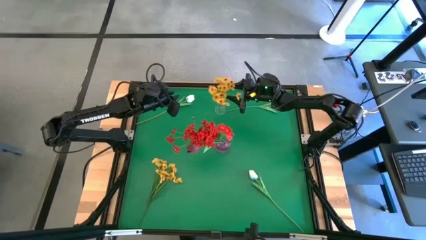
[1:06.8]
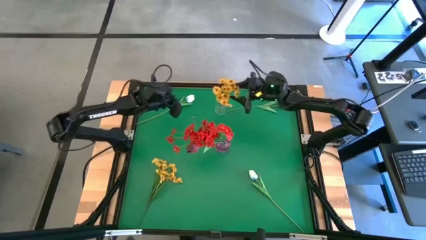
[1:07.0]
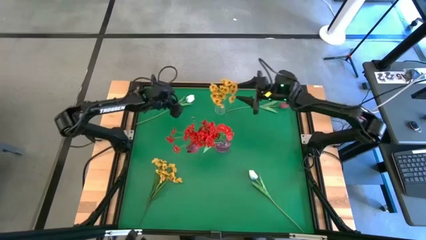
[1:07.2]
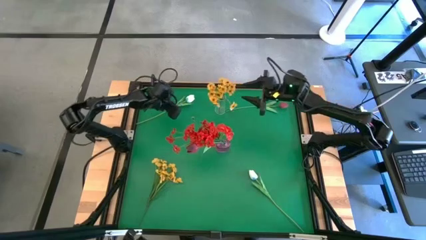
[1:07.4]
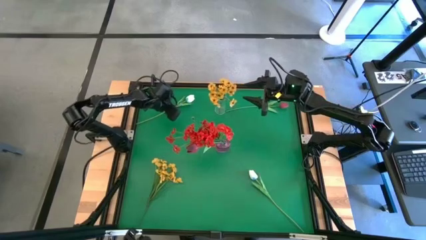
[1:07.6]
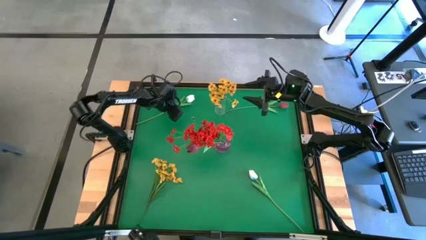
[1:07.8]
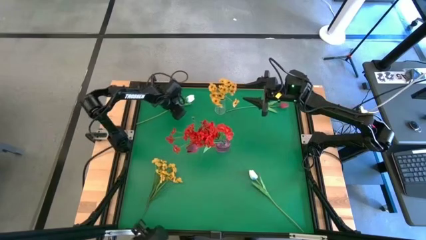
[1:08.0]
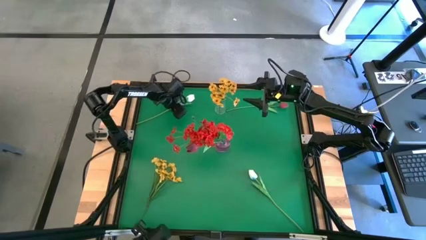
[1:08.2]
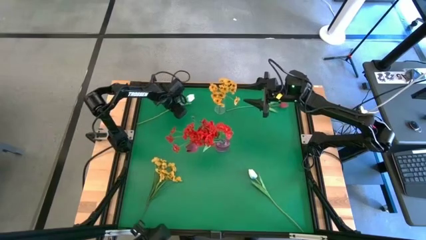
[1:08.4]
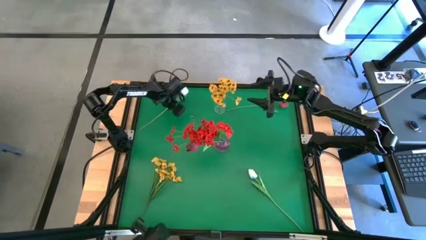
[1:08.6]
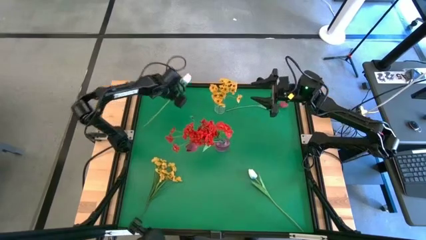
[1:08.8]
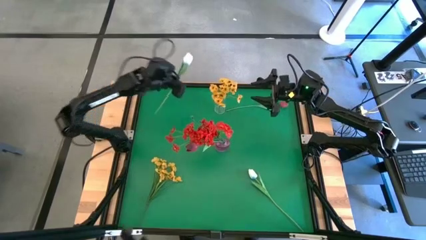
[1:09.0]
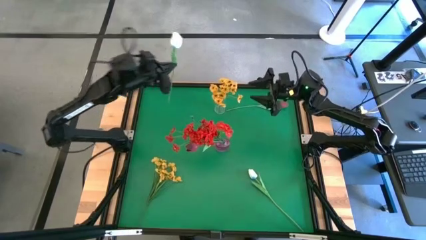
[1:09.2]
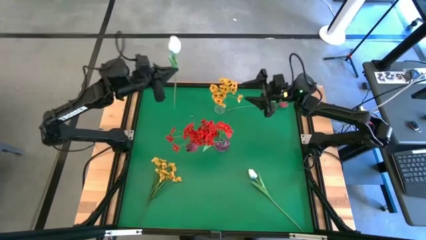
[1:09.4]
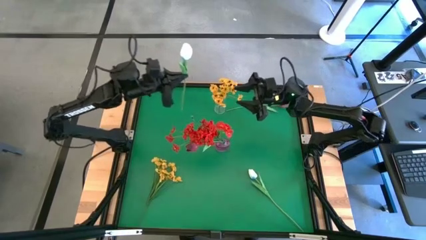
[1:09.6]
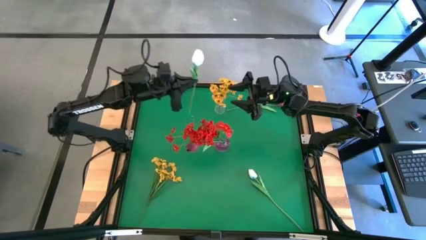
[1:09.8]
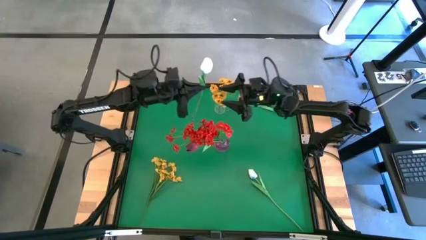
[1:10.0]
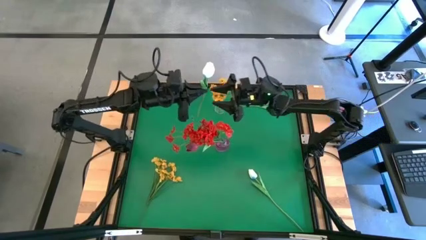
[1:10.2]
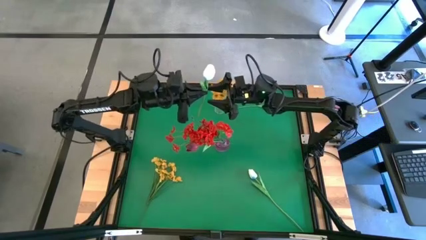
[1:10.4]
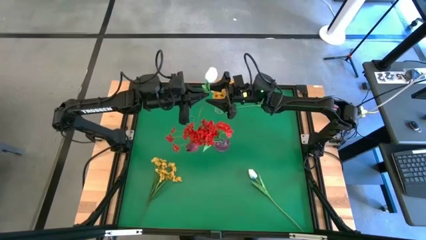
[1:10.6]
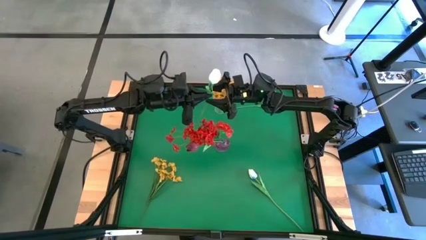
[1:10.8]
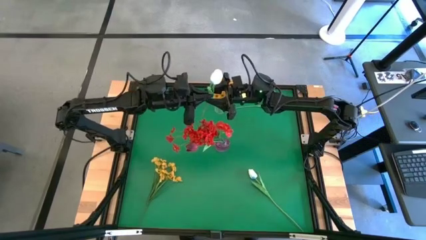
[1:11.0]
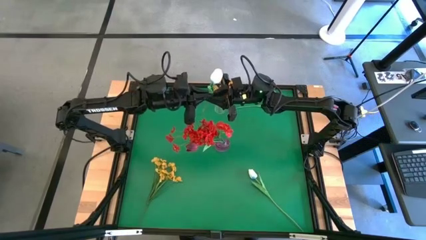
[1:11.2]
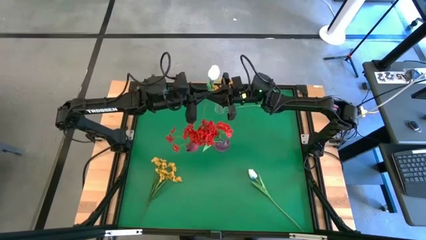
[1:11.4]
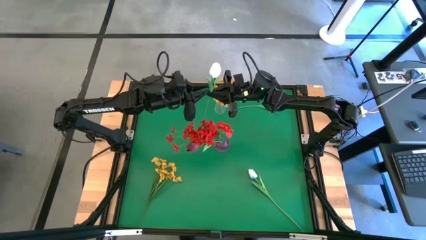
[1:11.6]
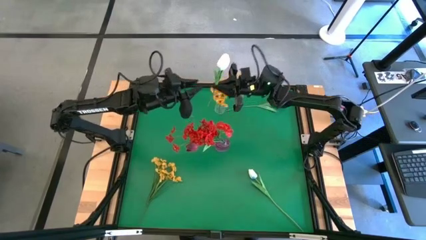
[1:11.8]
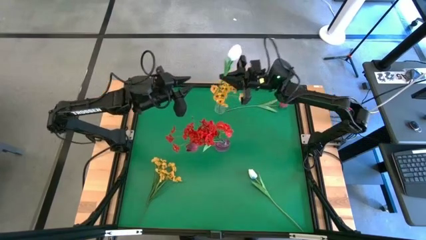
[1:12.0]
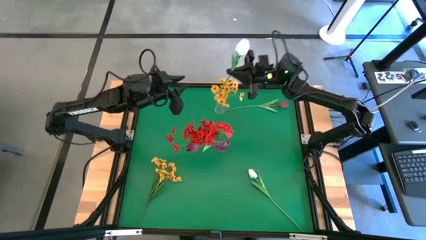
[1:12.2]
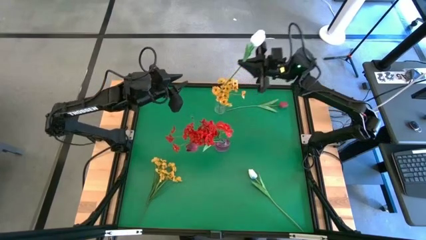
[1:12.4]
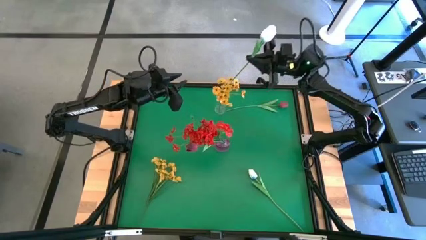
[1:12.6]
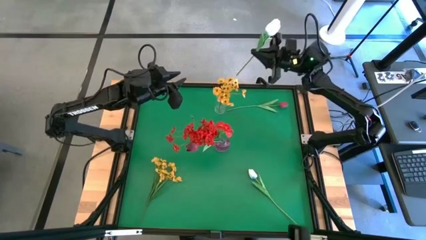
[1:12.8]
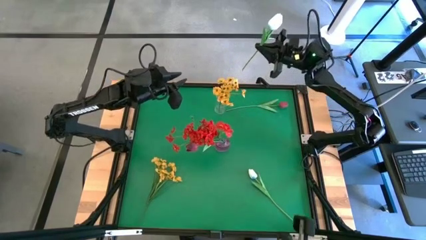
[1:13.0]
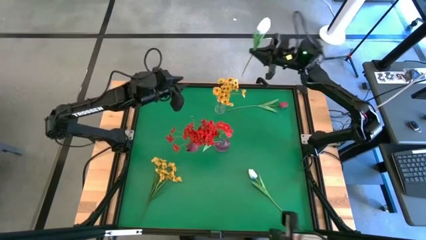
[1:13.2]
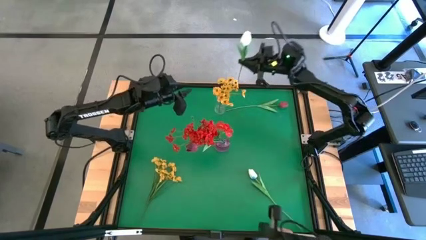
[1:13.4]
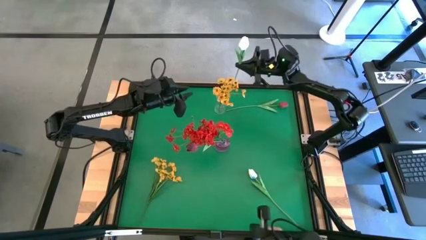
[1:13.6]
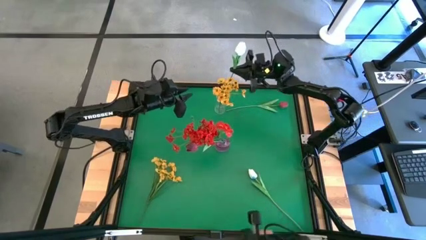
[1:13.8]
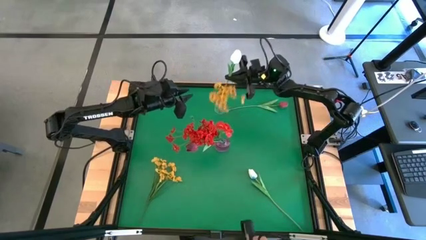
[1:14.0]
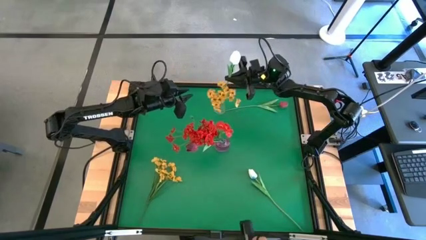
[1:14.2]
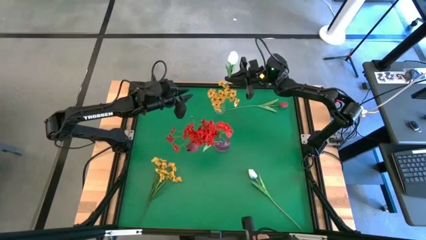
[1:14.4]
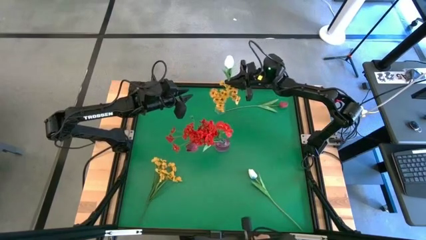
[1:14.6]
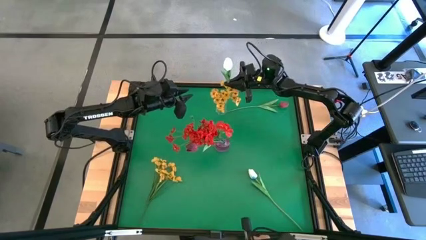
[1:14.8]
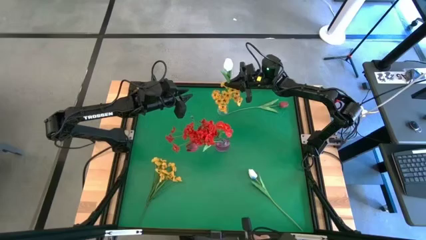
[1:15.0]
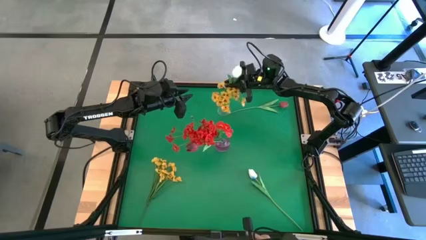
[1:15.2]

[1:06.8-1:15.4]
Task: Sort flowers into vase by color
Put the top white flower into the transparent vase

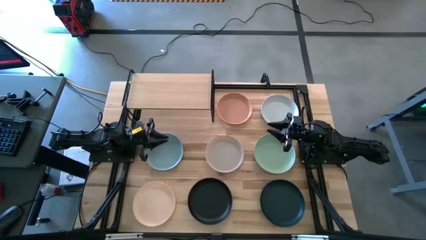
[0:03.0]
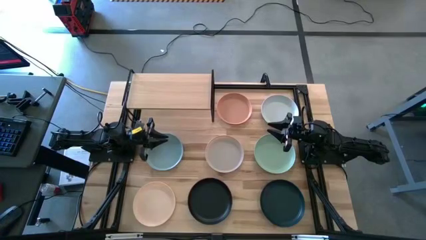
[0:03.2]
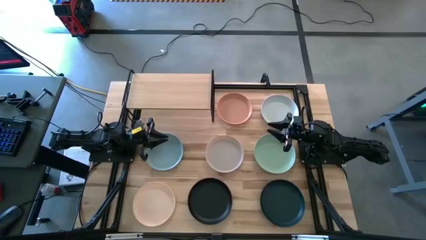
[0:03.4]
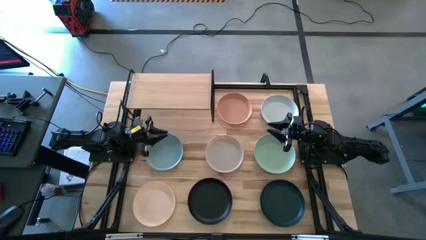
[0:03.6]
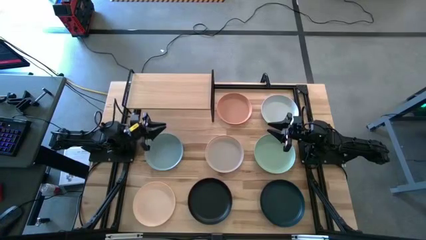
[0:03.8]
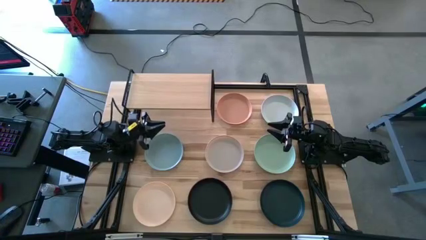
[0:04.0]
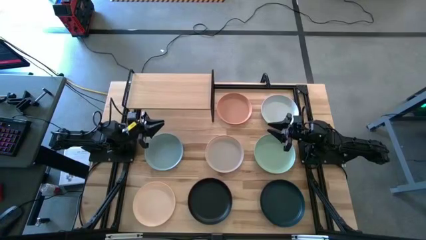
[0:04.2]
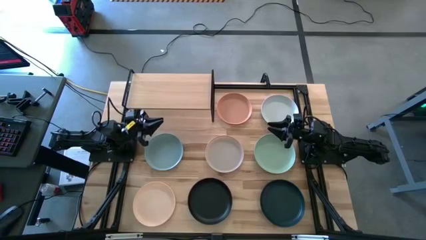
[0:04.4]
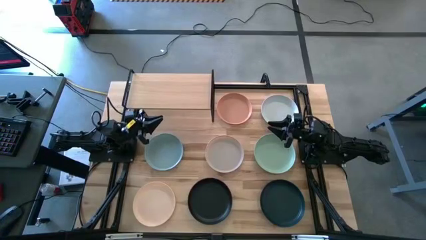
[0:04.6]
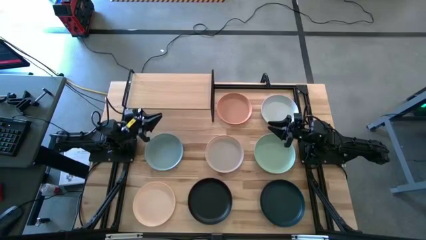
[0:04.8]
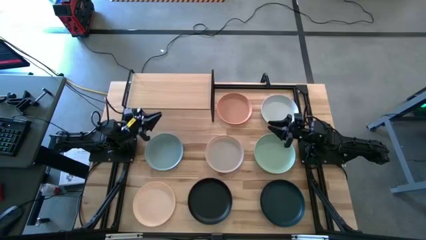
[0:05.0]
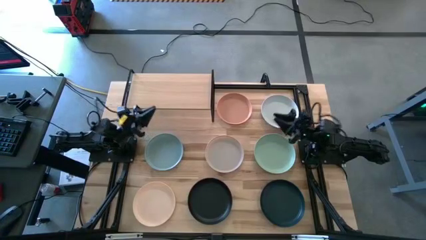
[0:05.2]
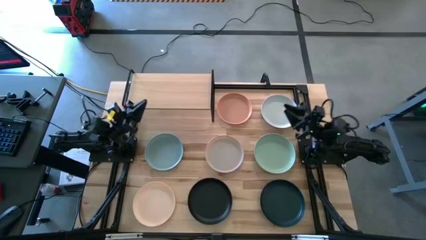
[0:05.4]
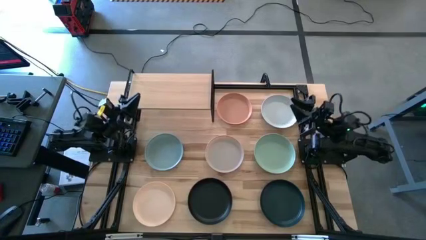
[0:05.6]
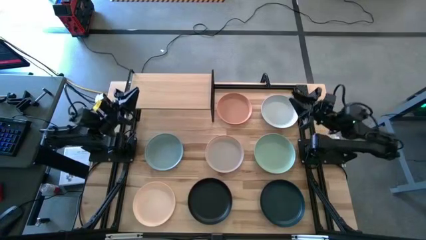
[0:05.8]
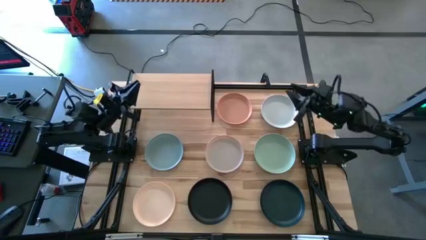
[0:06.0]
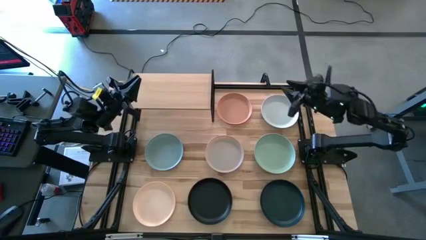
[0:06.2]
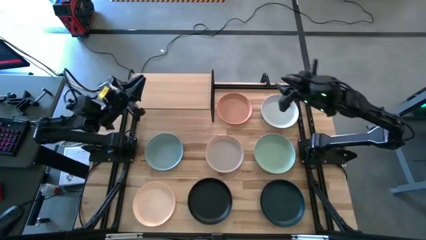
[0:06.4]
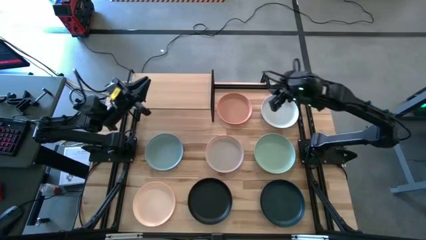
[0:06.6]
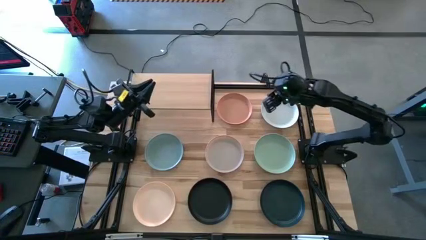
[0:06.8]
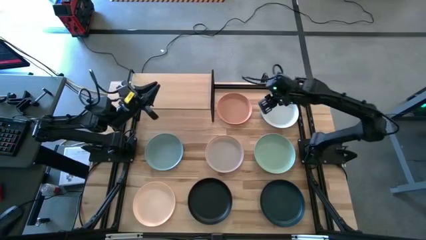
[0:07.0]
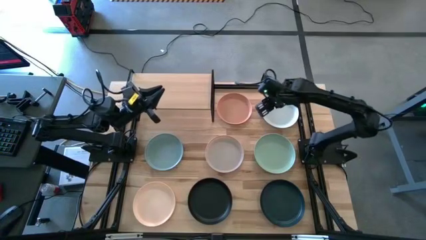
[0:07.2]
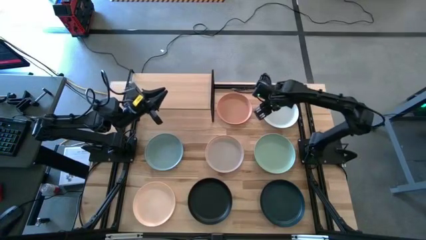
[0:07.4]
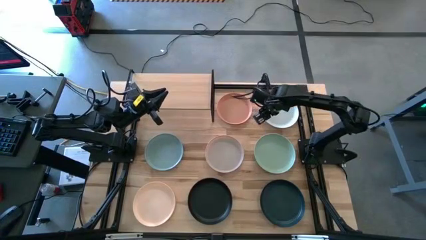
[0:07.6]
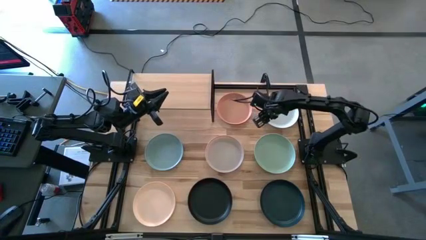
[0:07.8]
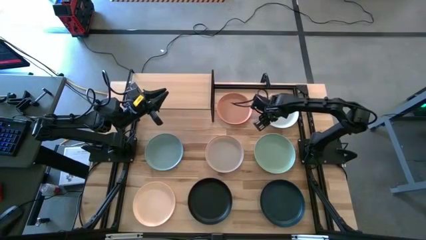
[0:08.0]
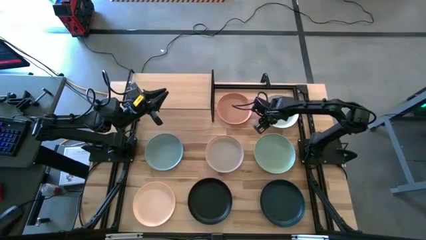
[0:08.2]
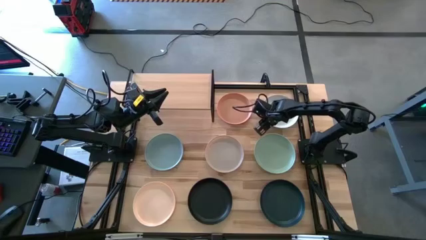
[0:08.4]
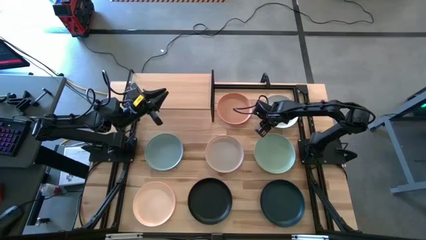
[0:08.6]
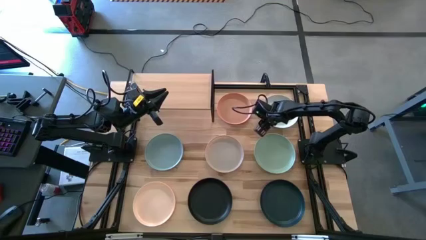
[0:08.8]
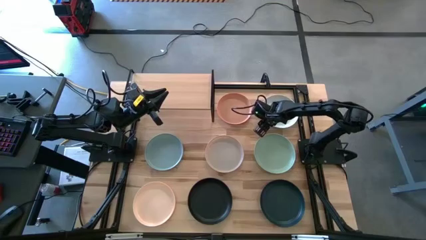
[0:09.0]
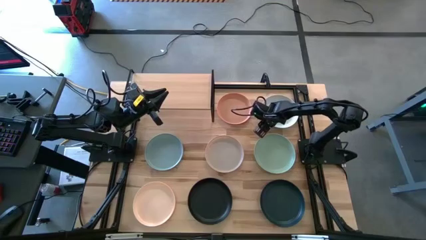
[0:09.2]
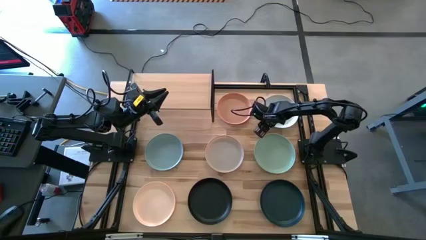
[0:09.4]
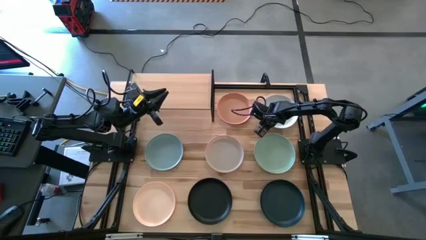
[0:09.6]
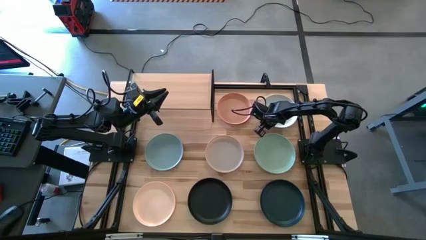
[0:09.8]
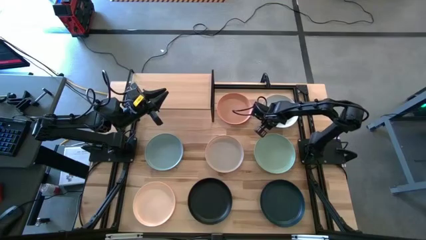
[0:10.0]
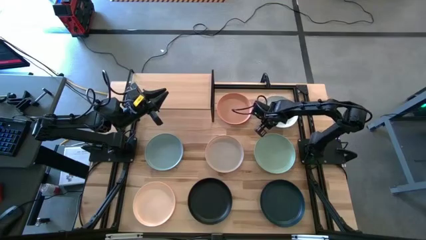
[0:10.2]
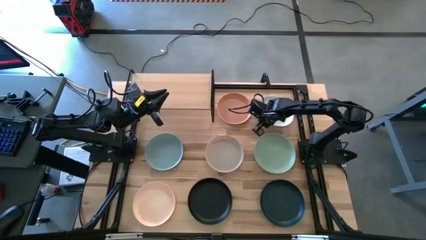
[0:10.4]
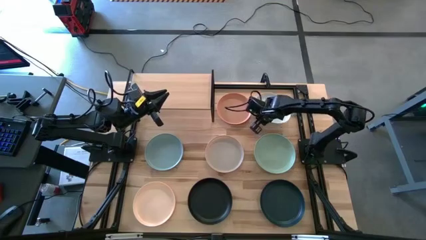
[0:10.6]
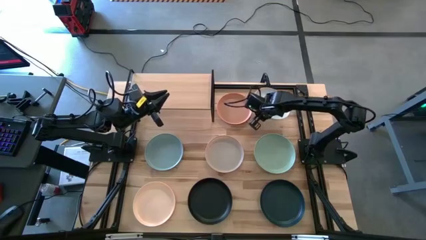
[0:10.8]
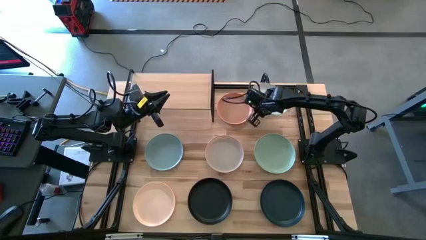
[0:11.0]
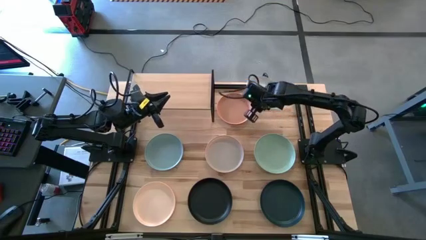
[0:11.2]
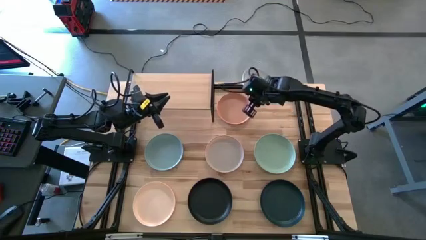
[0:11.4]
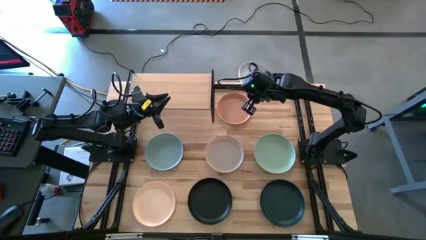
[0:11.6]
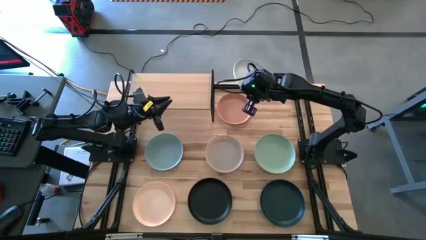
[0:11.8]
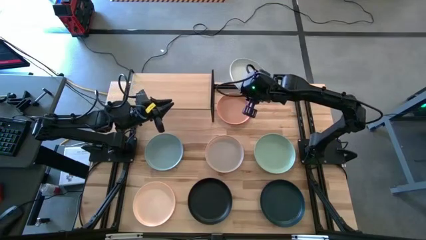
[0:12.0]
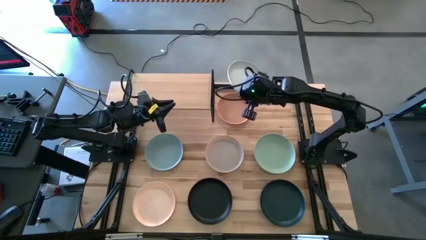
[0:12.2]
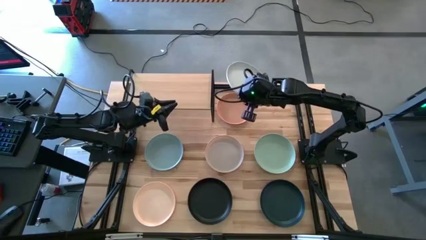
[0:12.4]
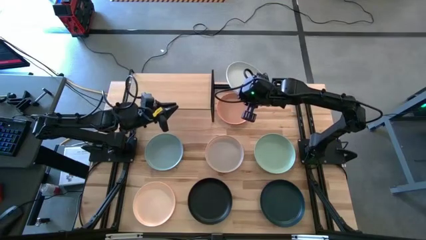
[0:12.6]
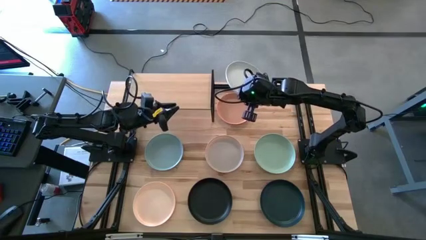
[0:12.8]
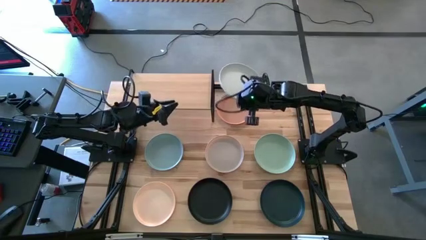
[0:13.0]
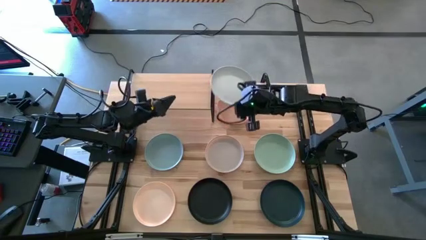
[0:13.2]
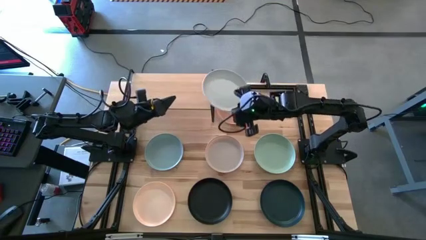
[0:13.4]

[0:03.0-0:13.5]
Task: Place and stack plates onto a shelf
Put the white plate on the shelf
